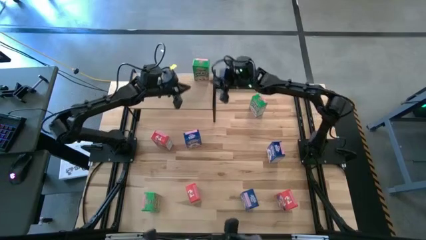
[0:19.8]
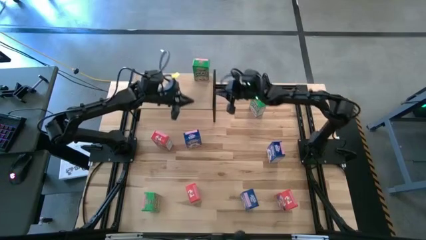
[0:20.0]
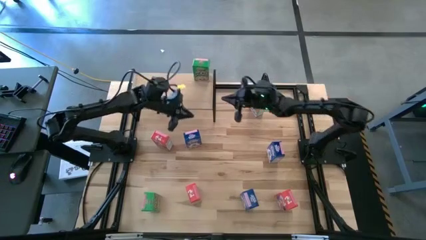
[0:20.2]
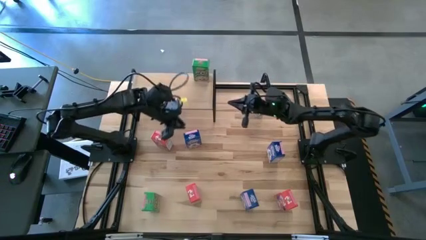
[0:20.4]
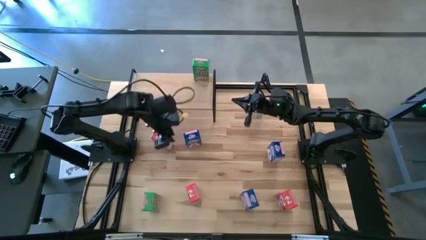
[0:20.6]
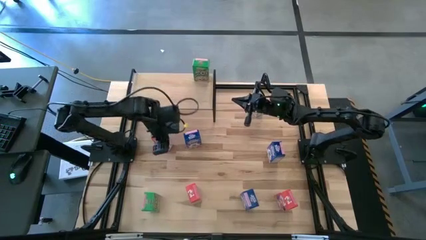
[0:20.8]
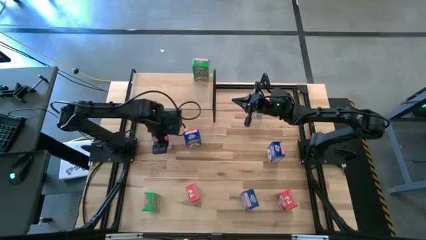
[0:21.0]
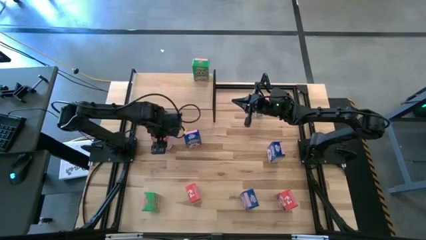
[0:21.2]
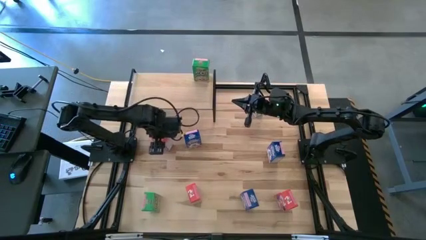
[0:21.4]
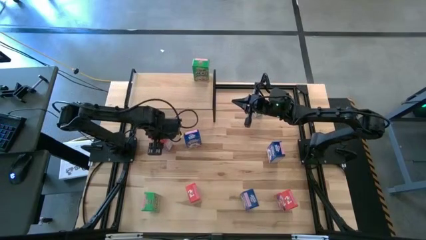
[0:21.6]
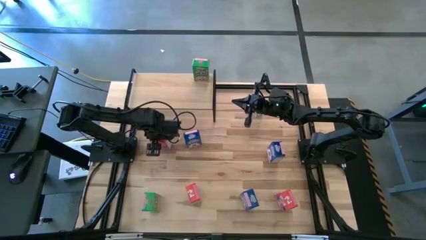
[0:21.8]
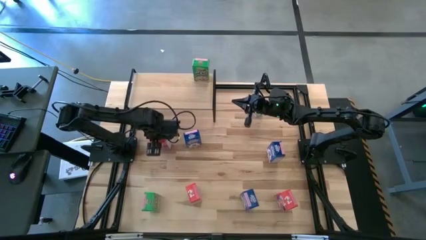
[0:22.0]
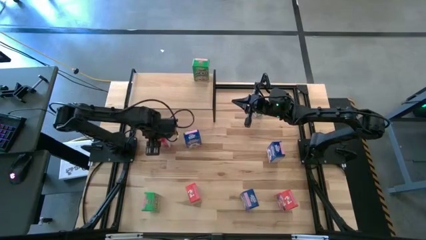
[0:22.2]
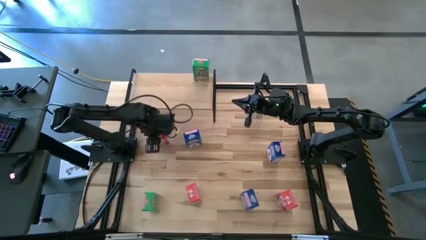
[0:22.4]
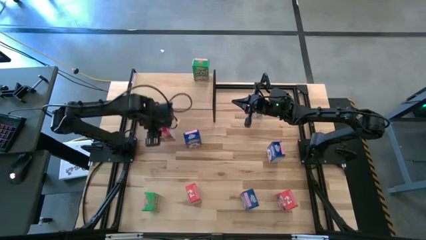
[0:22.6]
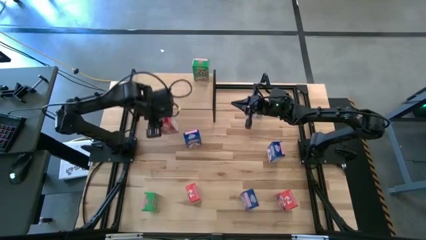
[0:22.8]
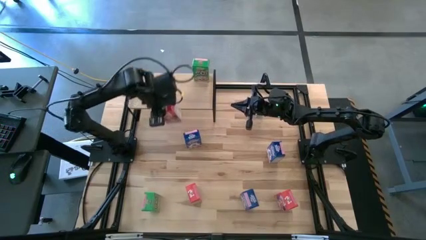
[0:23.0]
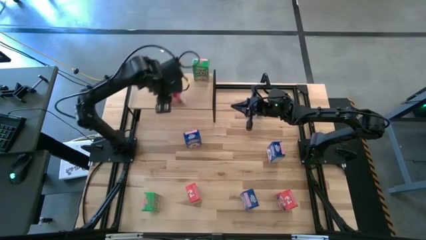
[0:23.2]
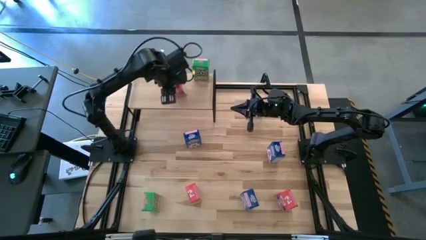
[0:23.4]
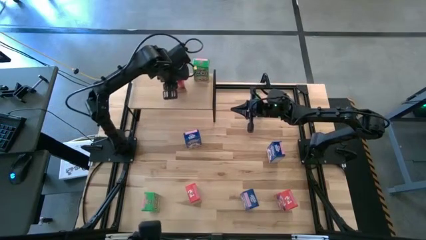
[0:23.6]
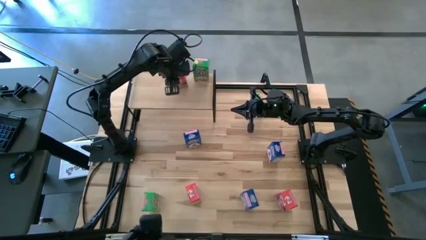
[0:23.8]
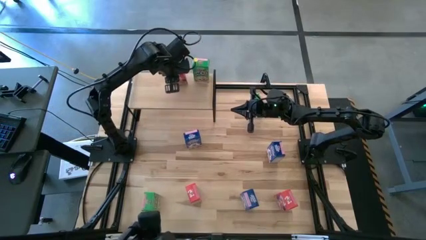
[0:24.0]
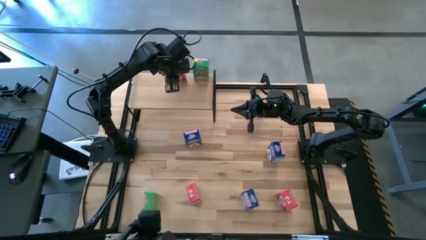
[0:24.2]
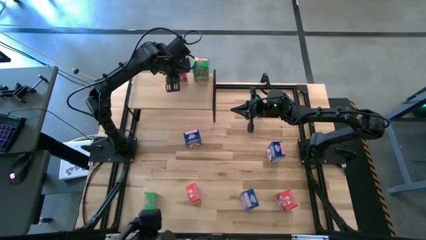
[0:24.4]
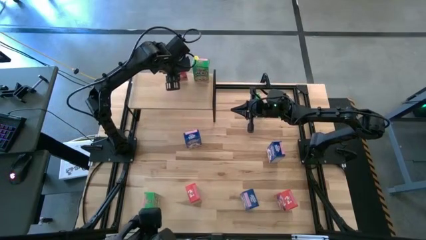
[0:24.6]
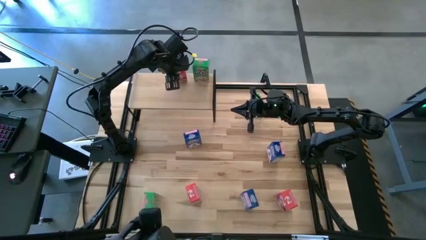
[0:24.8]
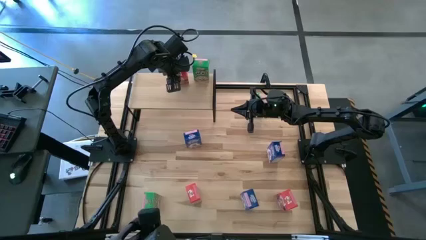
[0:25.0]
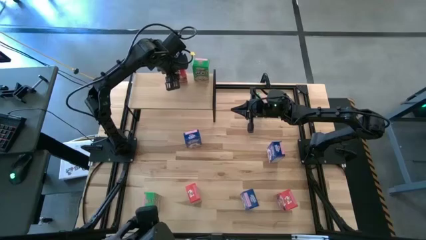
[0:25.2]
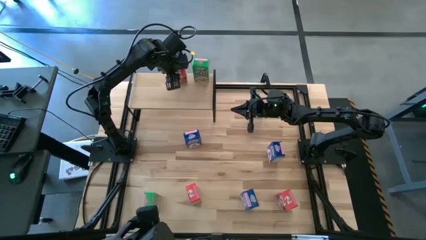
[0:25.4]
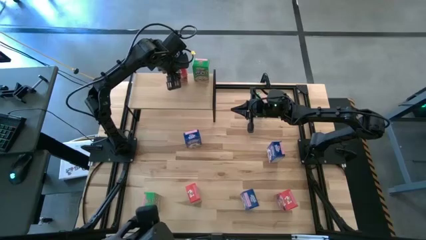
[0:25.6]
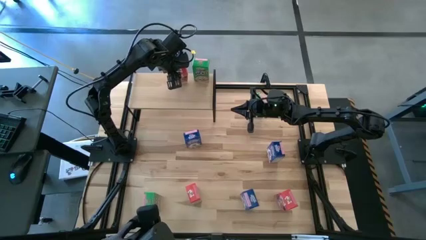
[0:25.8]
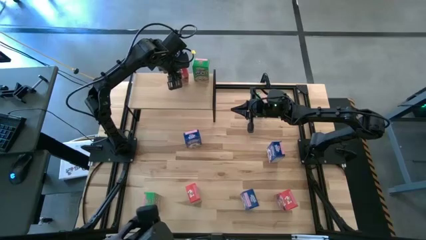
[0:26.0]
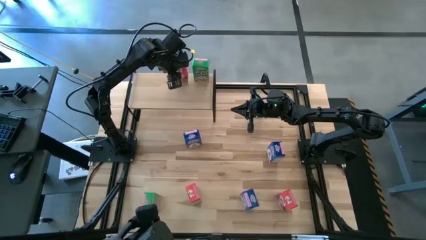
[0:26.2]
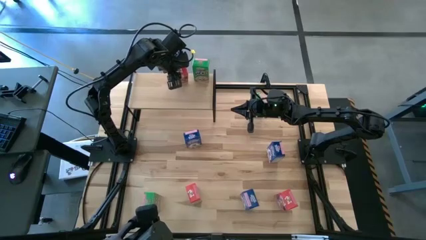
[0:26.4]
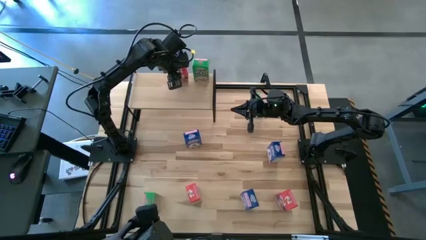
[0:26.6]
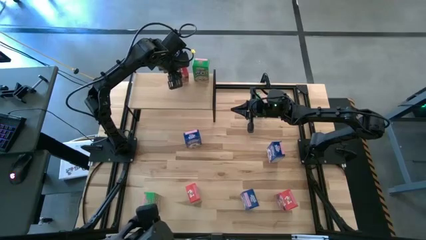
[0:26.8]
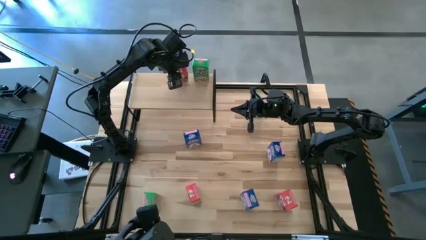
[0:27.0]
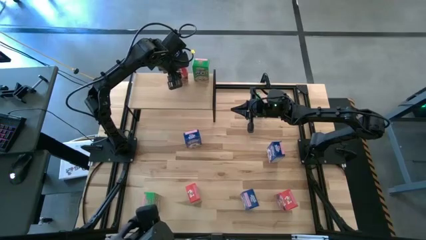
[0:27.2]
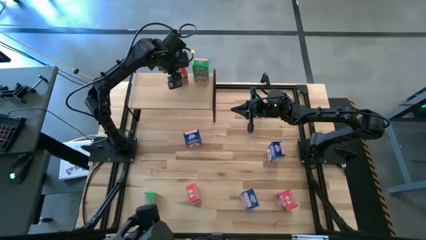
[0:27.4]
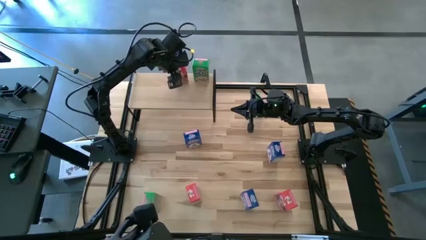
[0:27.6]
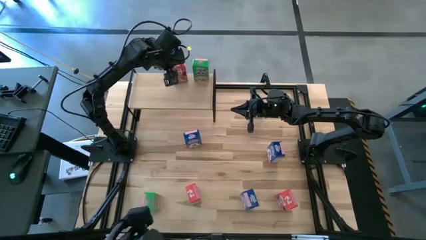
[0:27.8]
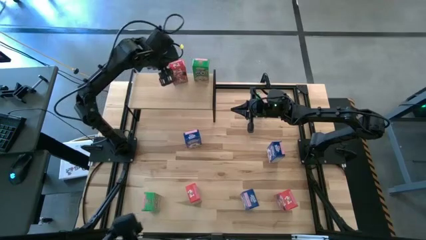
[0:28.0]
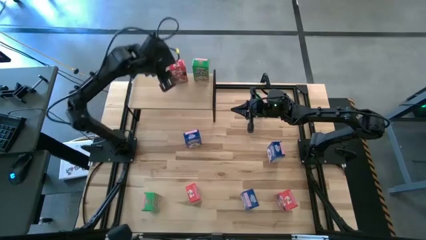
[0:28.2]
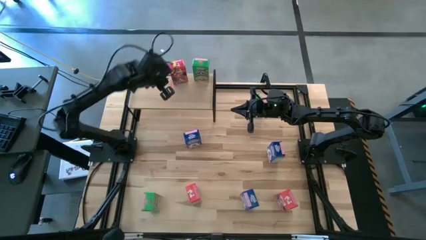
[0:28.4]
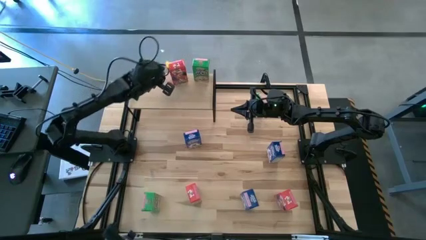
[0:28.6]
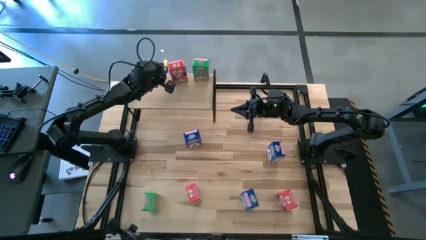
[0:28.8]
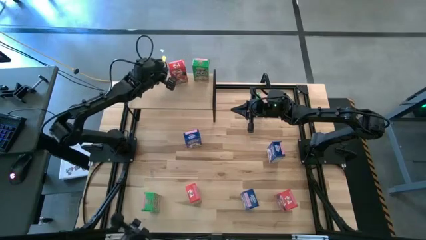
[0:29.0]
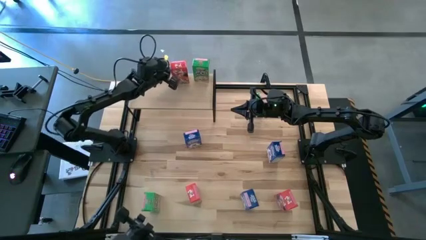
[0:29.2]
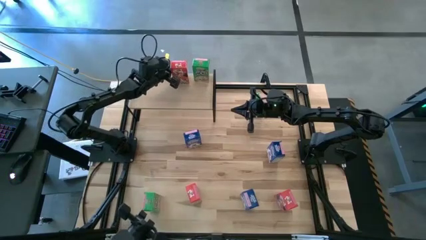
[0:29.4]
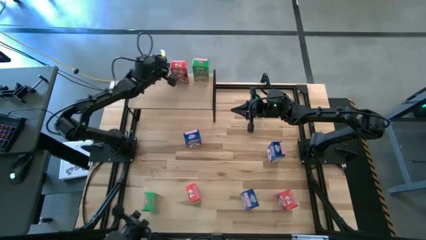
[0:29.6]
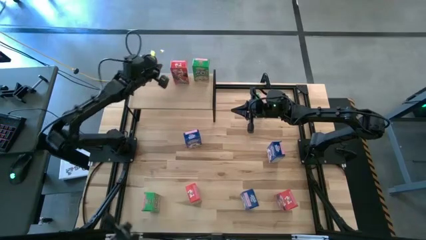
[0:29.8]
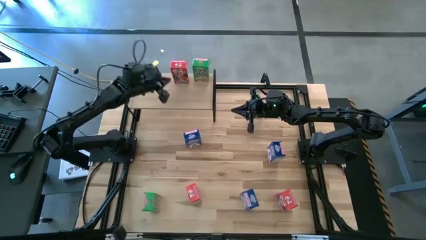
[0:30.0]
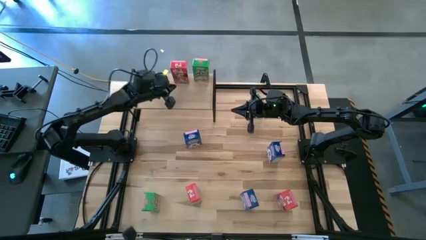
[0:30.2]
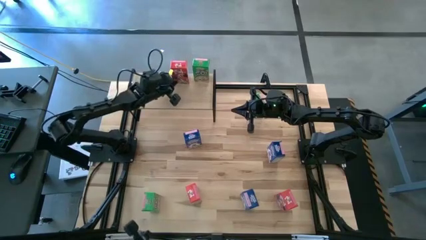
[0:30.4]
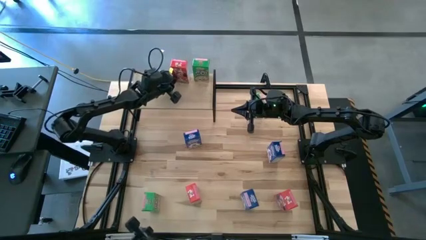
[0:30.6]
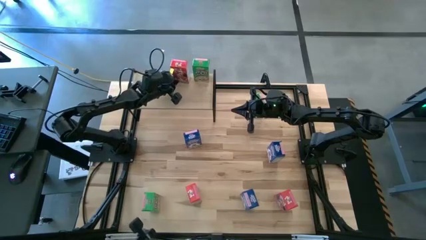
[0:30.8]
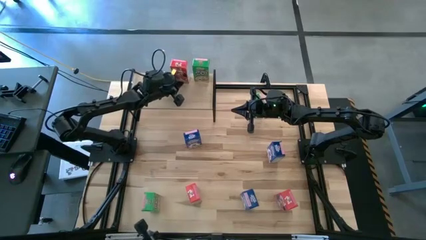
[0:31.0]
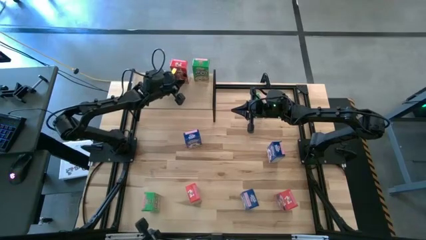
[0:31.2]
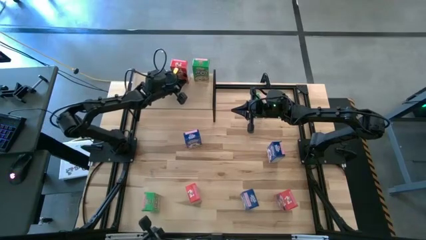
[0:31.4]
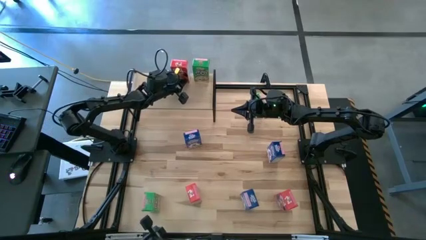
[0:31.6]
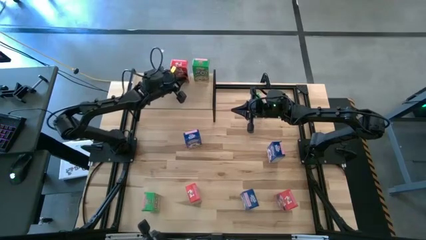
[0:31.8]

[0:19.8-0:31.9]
Task: Stack cereal on shelf
Put the top red cereal box on the shelf
